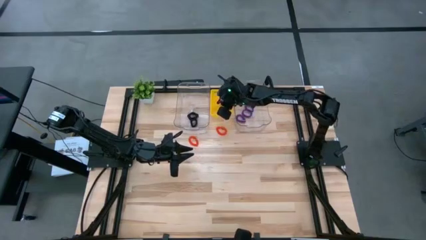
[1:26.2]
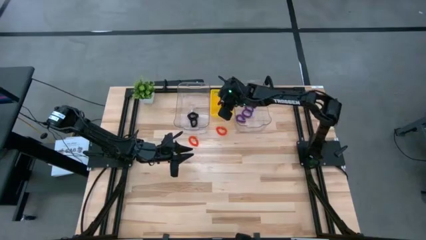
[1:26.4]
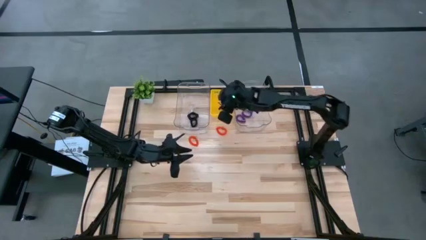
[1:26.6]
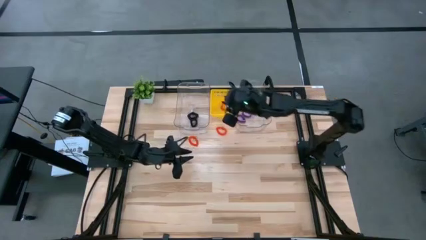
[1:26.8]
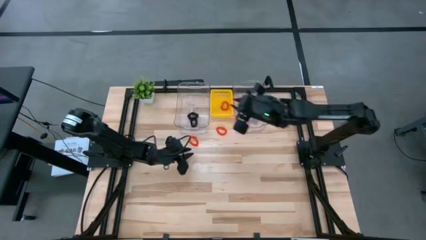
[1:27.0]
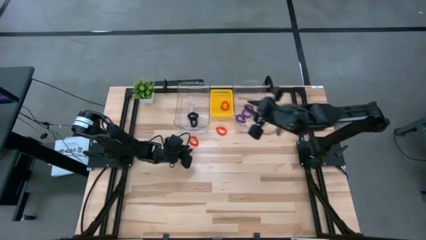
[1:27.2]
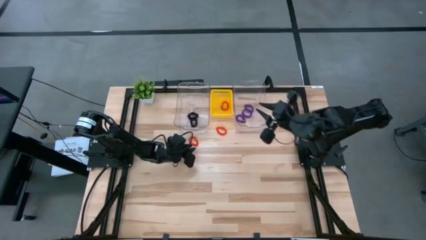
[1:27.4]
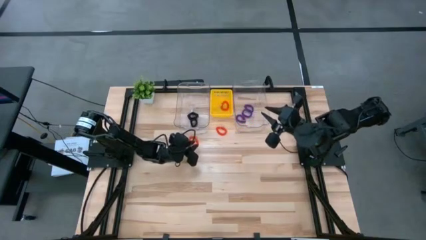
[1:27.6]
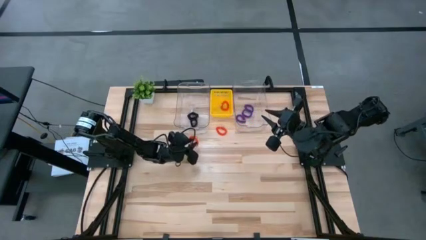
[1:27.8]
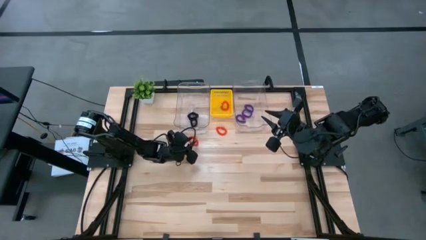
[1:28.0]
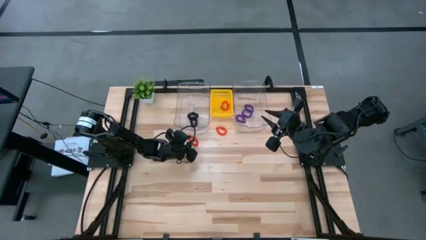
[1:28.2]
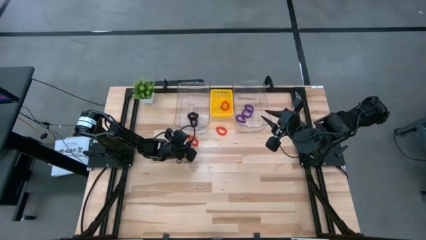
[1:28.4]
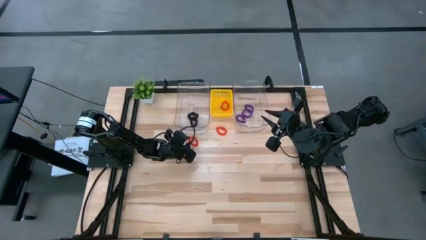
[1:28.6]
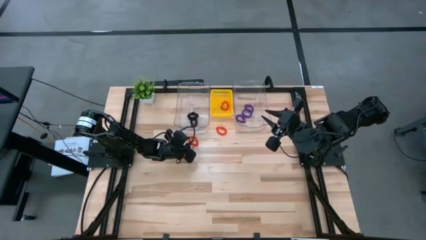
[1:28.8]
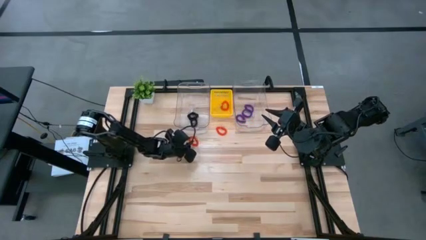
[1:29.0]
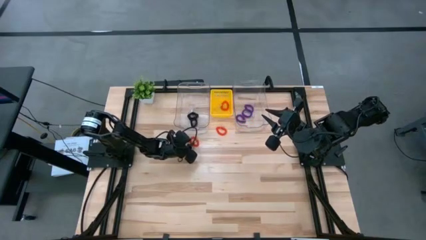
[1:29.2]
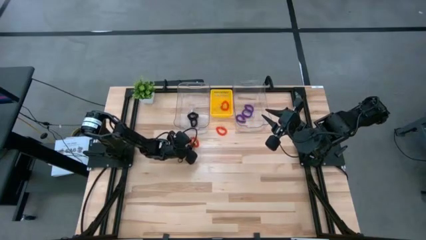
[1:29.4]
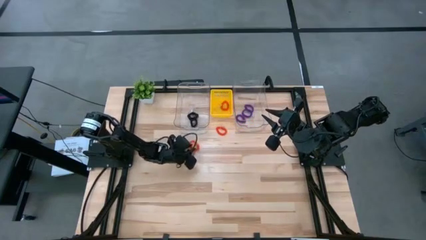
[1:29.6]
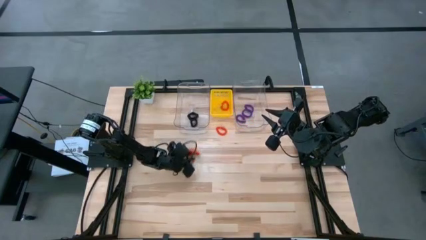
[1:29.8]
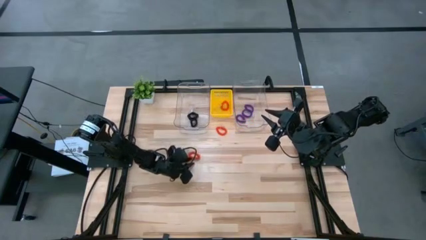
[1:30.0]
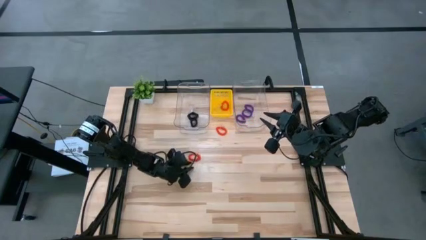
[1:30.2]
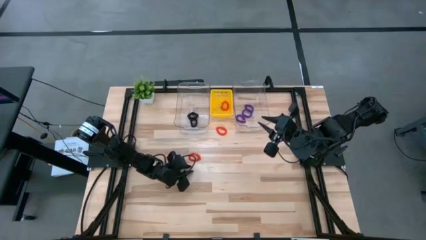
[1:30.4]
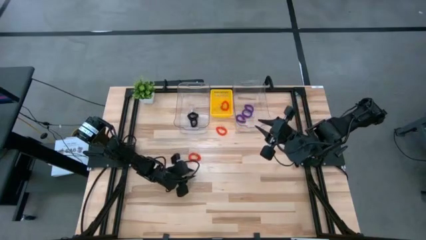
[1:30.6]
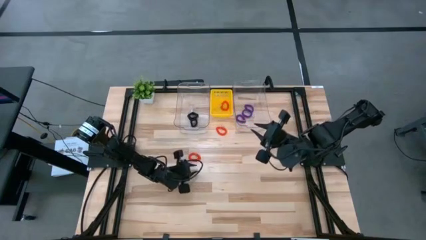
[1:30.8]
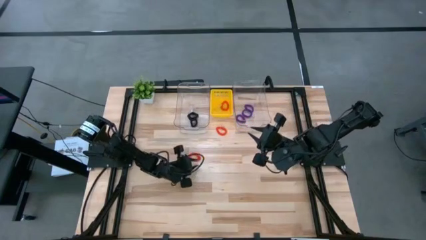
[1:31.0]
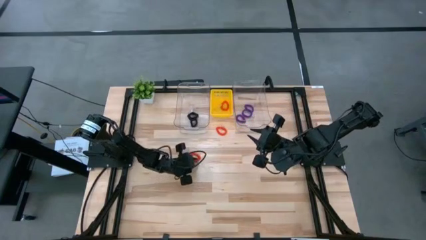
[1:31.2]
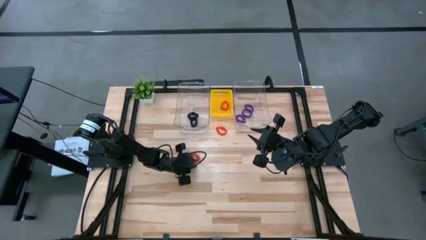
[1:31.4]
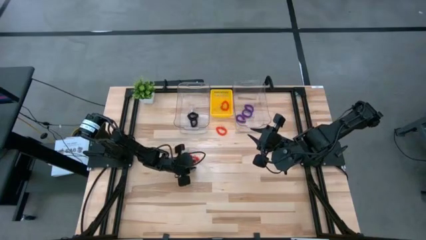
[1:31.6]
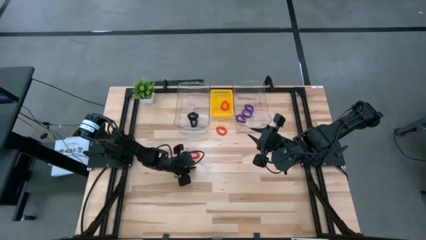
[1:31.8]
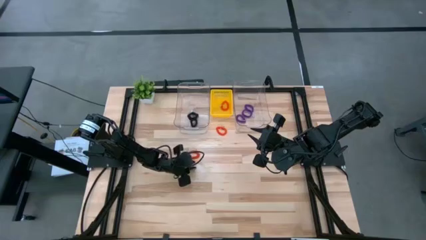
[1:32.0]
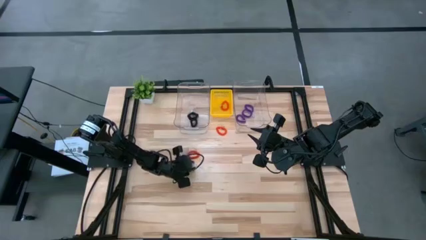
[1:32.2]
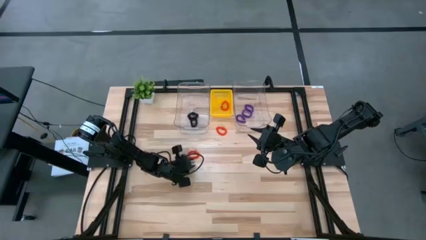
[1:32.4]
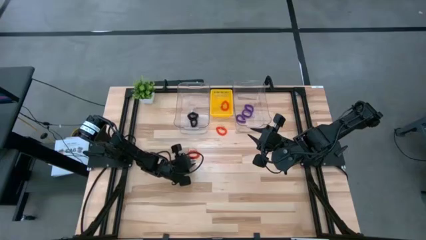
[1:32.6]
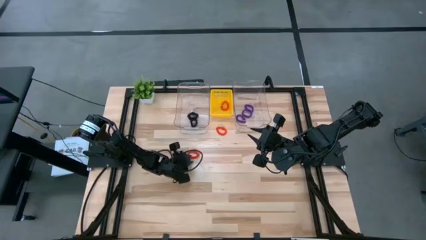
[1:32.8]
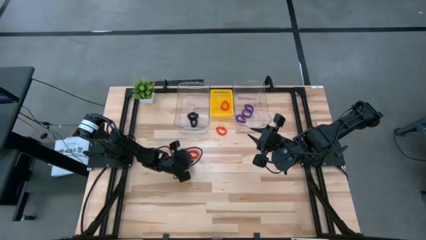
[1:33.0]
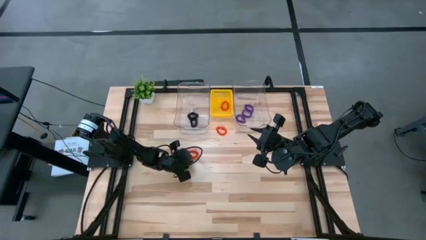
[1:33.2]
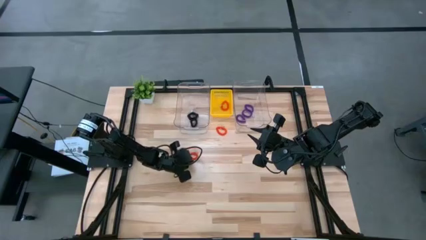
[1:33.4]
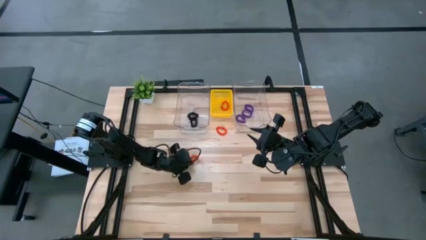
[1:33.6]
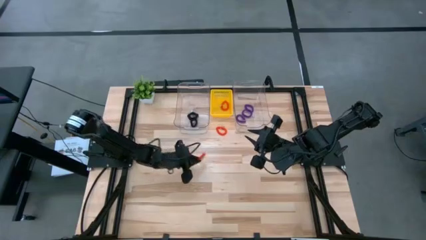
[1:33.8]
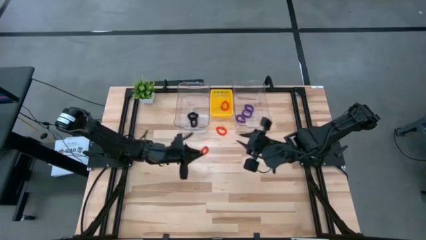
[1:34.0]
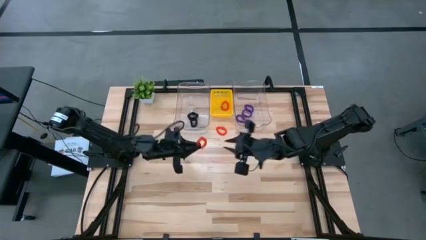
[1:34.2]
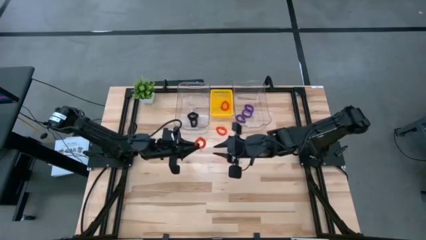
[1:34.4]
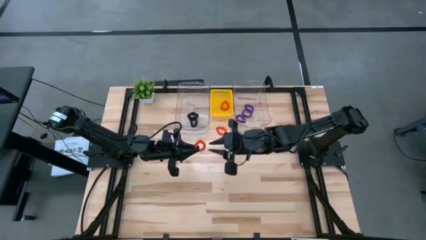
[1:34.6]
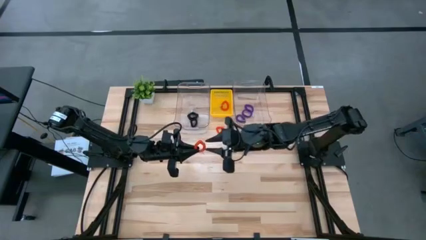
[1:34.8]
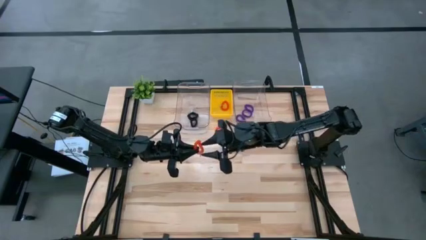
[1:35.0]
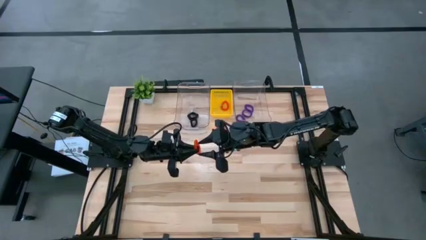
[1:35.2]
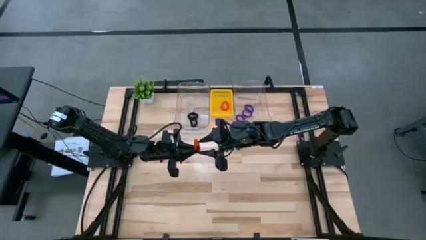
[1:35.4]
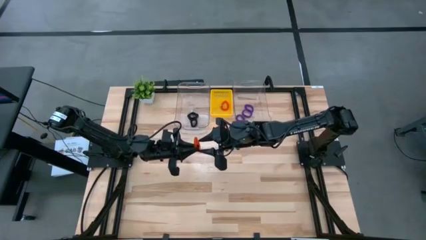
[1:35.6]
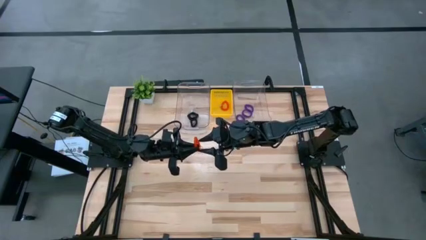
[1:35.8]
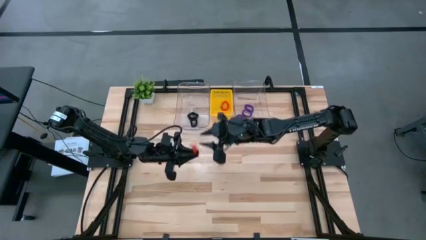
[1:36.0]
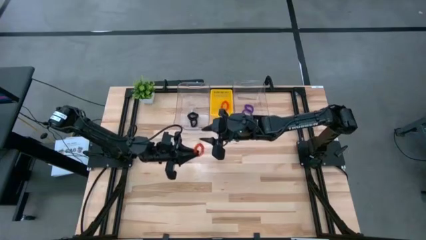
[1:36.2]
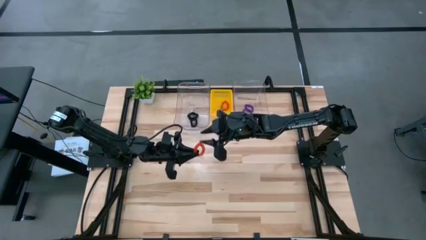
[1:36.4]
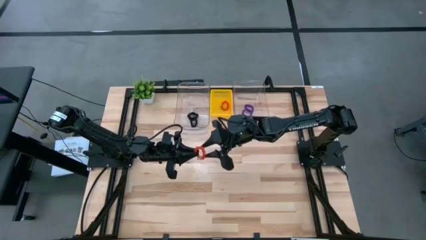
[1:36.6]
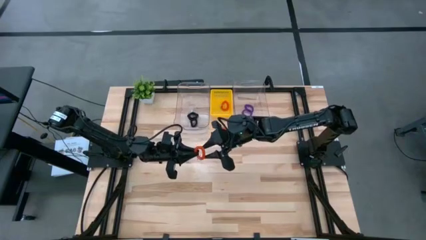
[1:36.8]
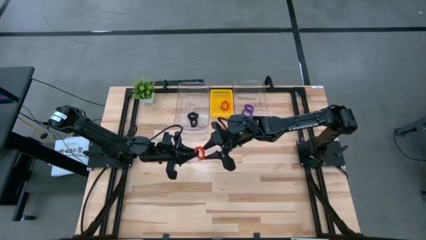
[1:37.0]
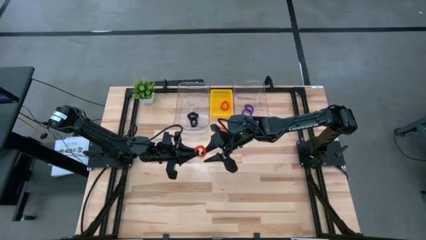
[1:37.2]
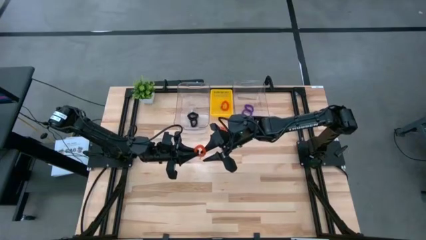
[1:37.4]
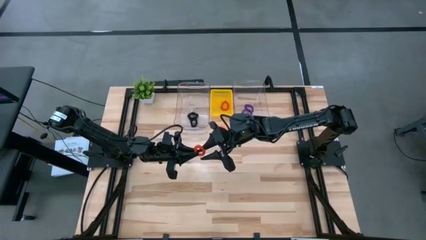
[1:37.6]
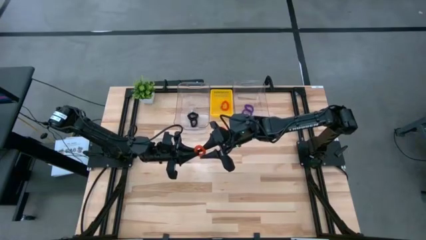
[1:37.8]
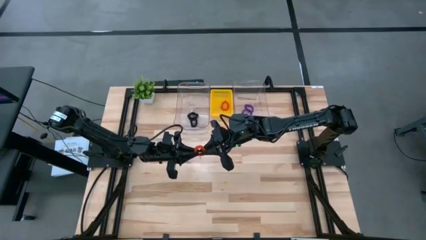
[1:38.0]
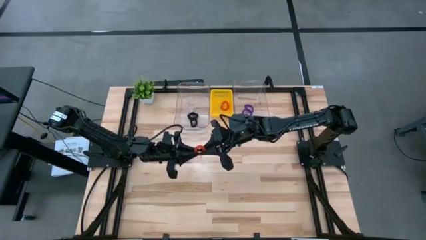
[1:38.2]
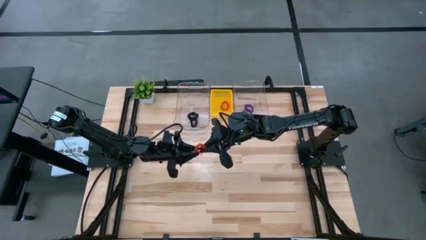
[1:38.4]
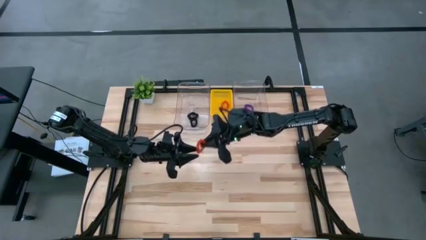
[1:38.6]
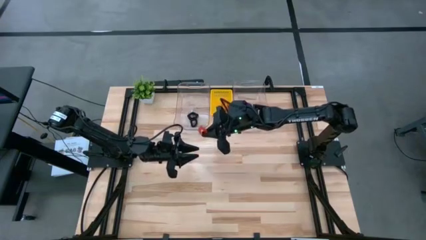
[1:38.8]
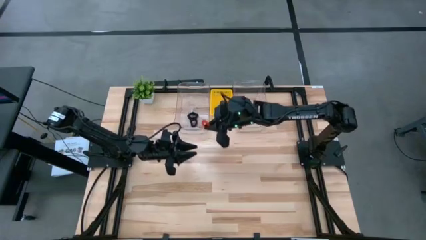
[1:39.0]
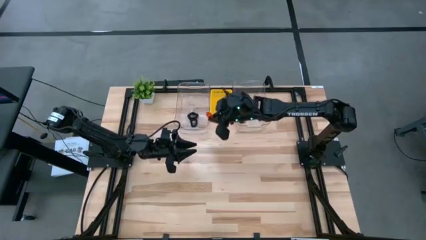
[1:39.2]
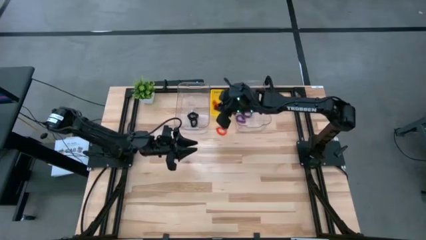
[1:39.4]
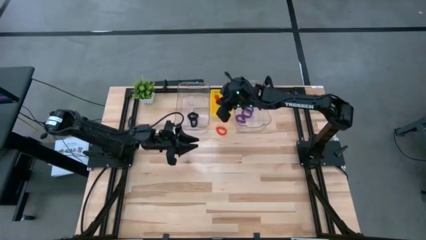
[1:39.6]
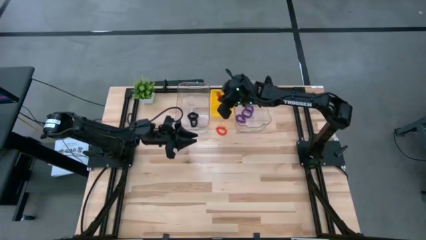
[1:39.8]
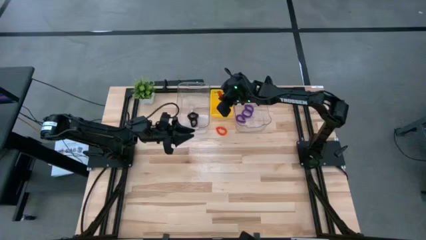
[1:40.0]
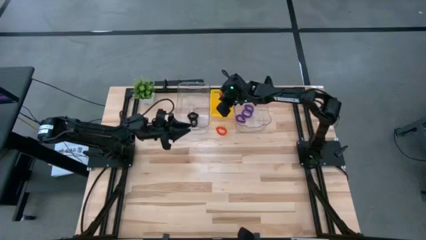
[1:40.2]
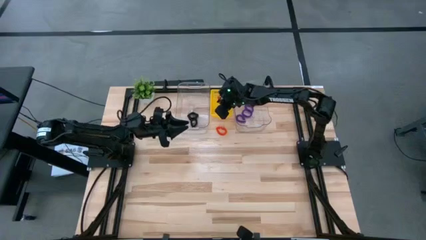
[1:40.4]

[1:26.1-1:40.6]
Task: Sort spring keychains
Put the bottom orange spring keychain into the yellow bin

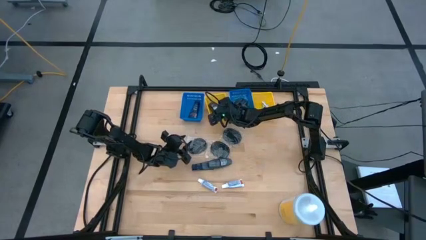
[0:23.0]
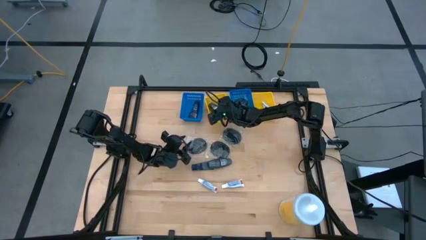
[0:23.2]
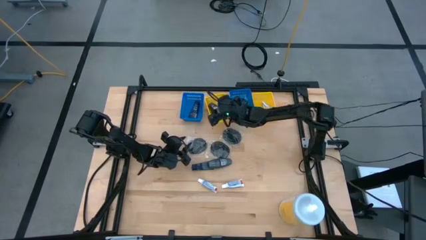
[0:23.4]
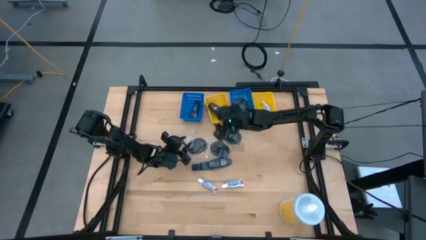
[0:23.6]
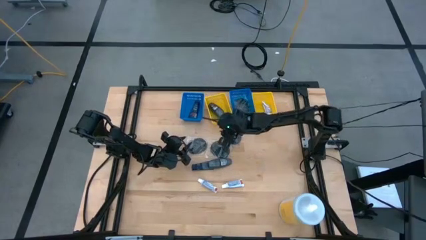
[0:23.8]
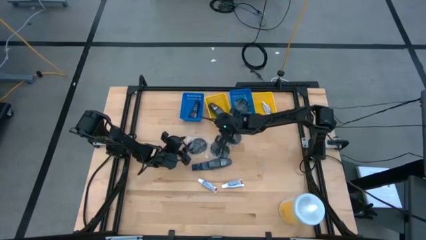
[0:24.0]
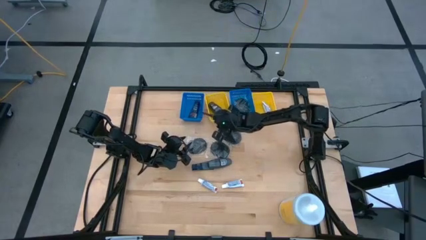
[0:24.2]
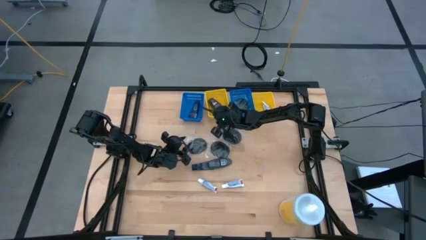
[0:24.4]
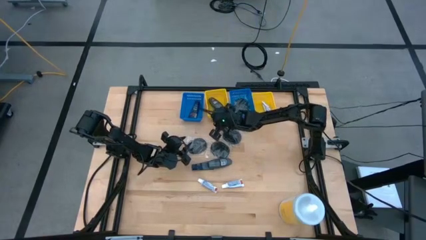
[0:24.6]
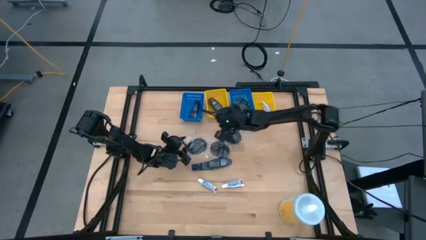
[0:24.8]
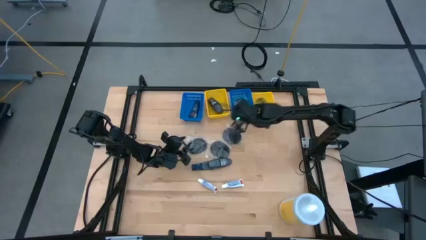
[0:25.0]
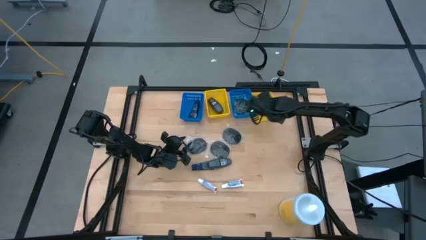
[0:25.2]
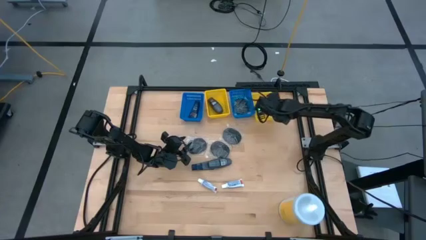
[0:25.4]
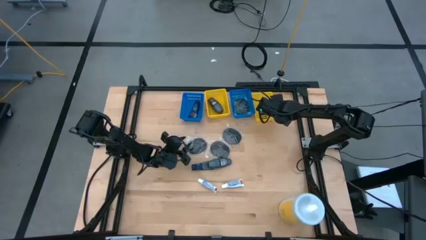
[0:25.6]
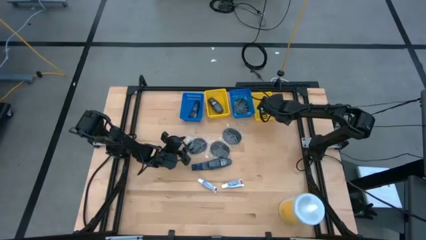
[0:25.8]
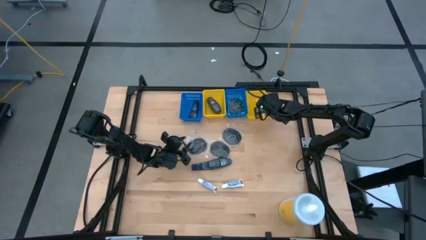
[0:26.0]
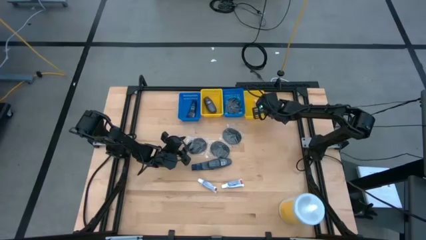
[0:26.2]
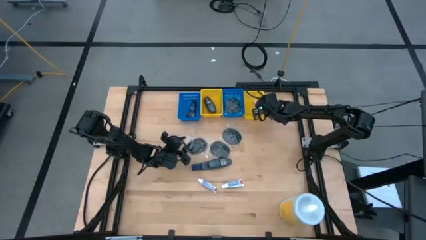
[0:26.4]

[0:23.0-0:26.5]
Task: Pick & Place Travel size toiletries
Adjust the yellow bins
